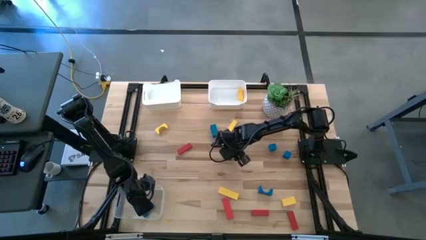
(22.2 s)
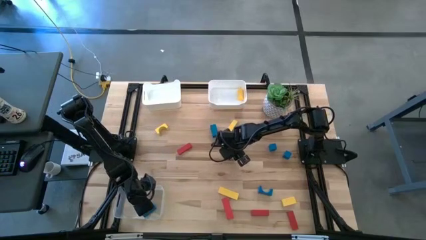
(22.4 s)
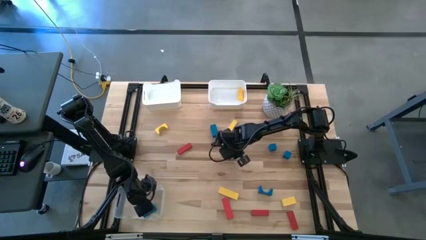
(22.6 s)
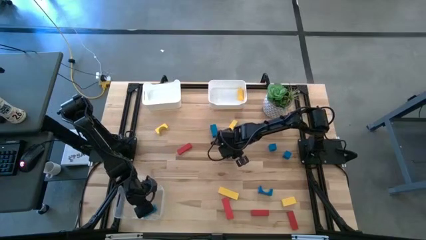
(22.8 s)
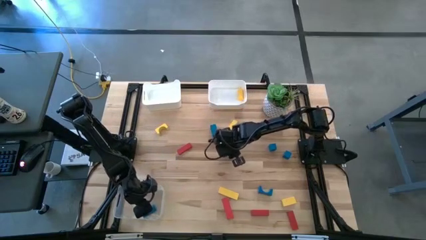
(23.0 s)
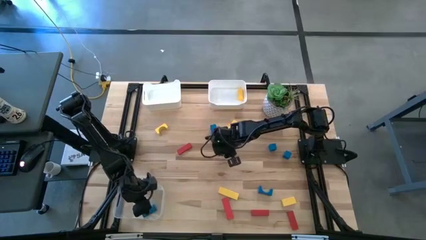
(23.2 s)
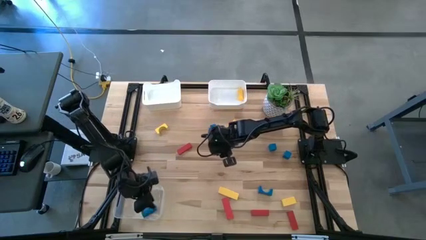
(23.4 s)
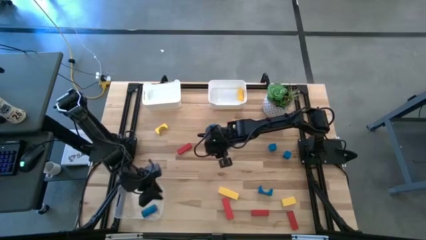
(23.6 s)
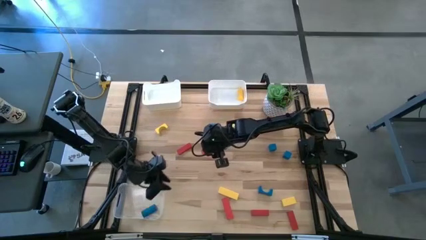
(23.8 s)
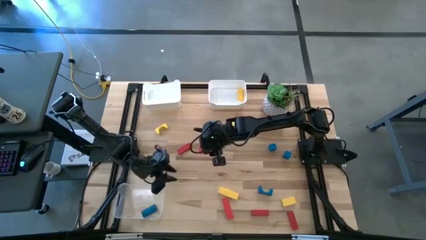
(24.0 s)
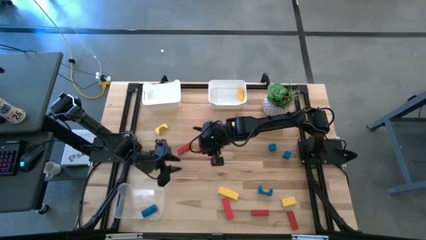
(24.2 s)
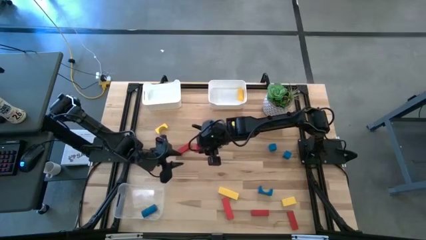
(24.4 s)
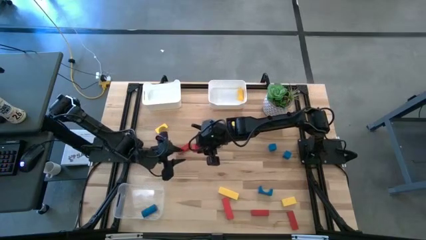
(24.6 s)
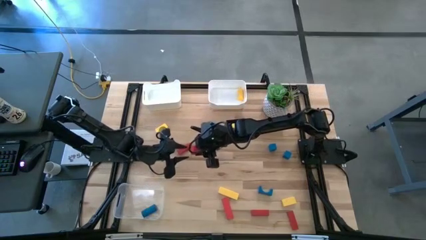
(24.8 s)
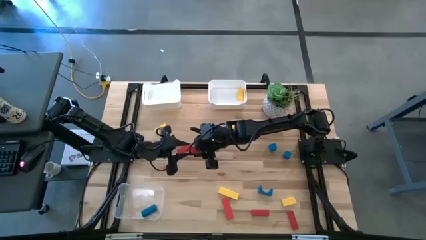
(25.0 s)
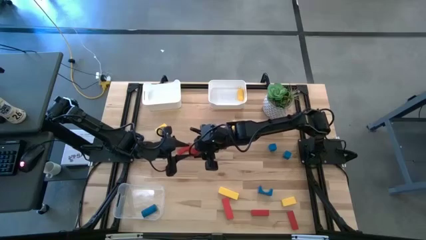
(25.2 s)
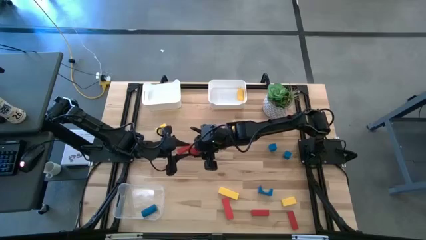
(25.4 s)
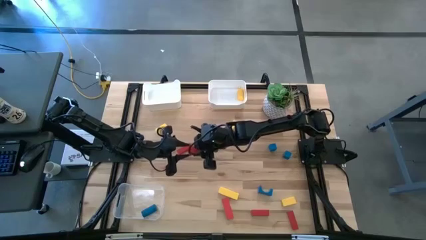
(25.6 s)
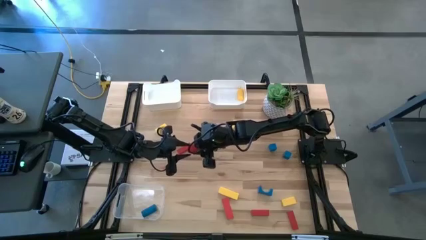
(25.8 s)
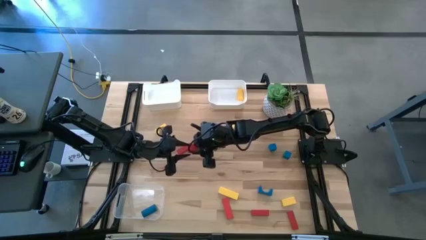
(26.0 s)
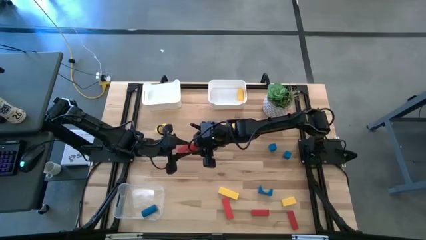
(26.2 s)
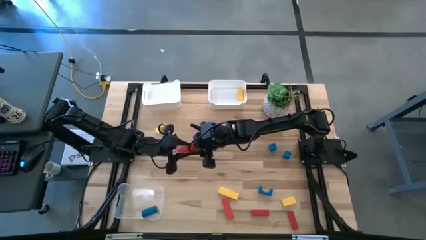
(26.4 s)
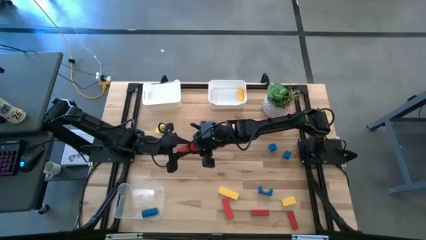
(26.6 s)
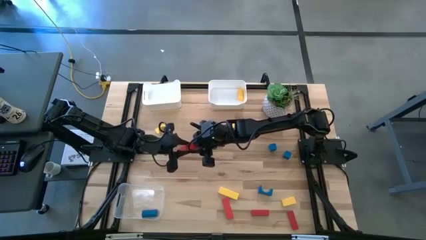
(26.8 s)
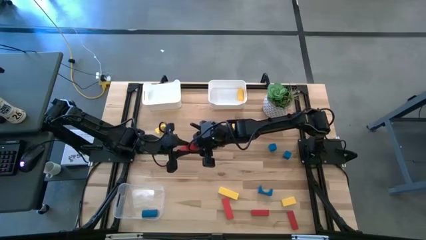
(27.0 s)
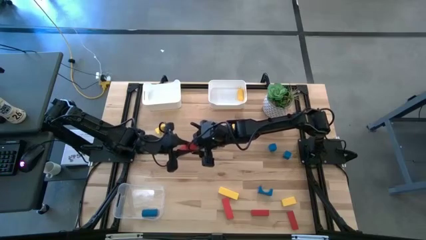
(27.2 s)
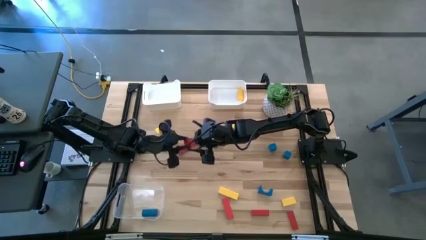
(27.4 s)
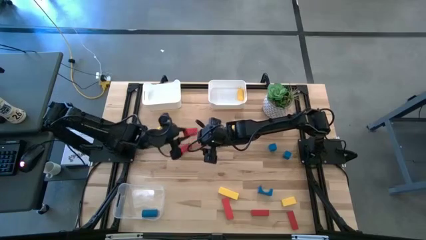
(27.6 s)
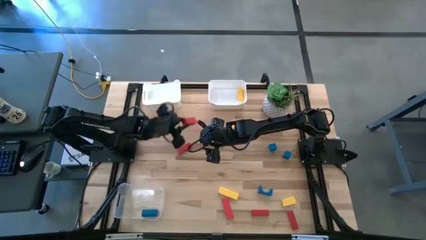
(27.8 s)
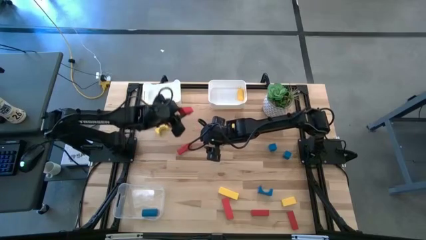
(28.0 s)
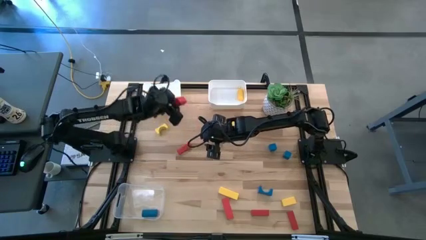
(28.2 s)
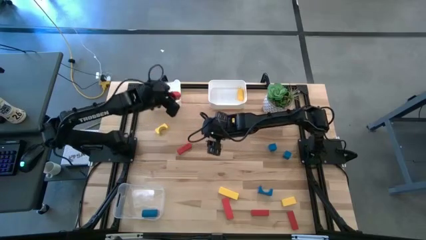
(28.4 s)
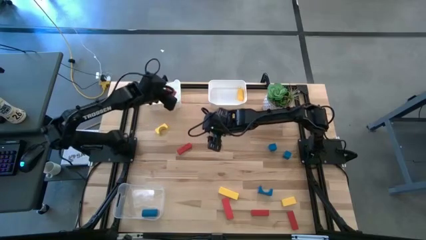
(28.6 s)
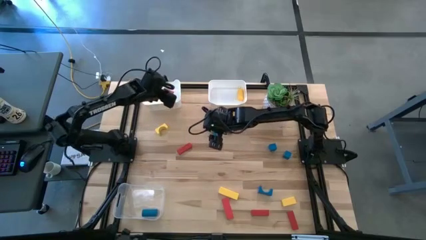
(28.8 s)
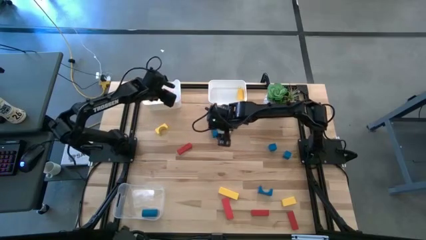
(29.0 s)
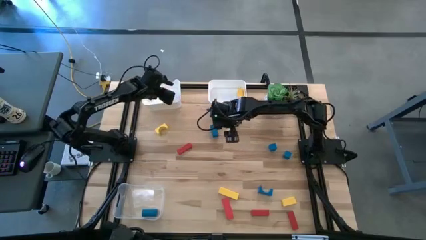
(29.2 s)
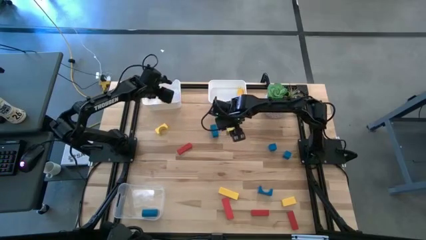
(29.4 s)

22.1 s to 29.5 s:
Task: Sort & place blocks by color
Put the red block into the left white bin

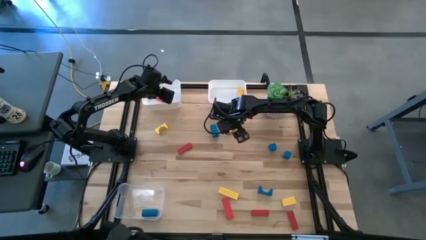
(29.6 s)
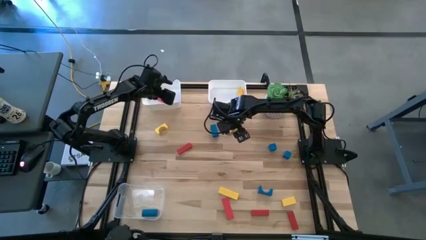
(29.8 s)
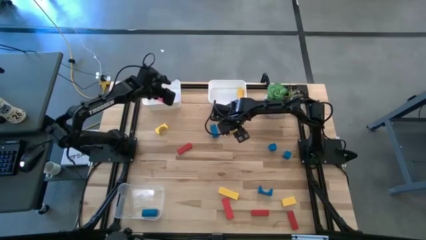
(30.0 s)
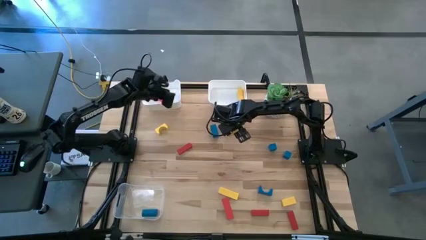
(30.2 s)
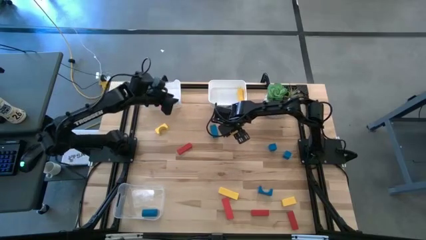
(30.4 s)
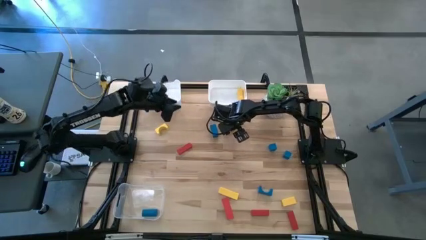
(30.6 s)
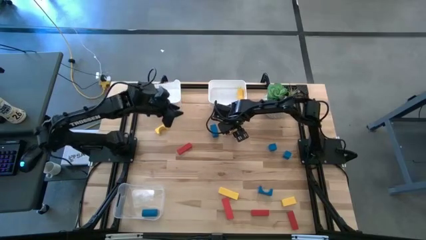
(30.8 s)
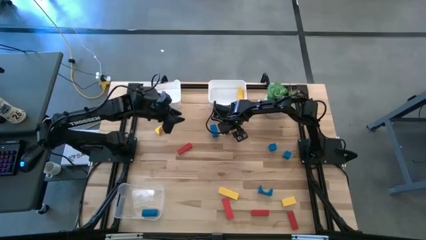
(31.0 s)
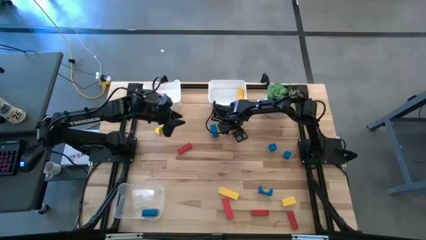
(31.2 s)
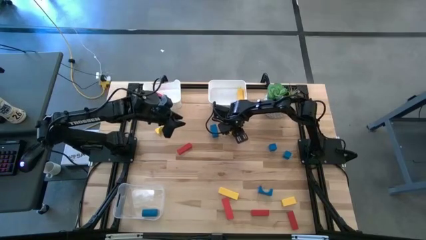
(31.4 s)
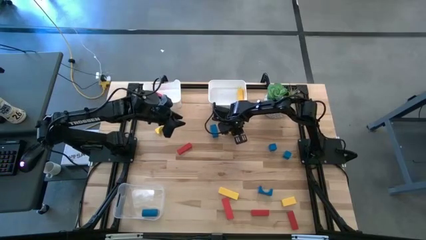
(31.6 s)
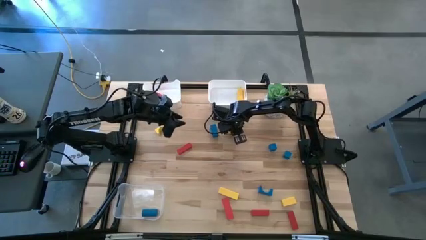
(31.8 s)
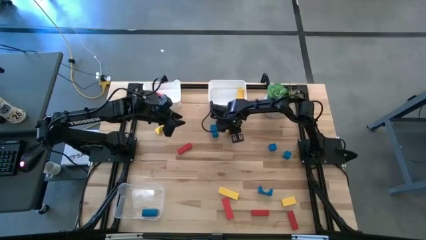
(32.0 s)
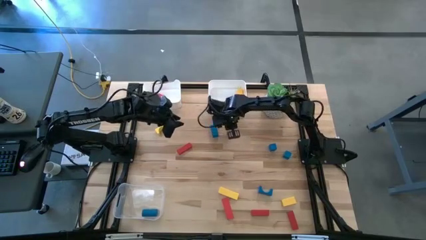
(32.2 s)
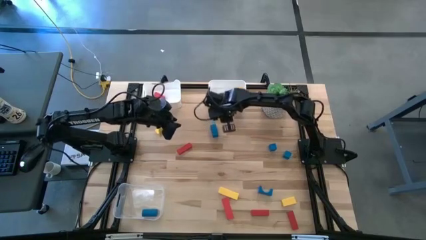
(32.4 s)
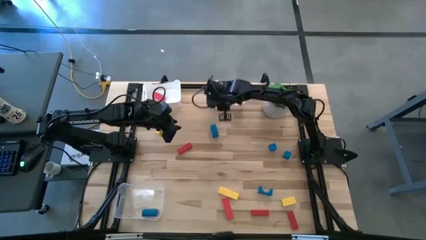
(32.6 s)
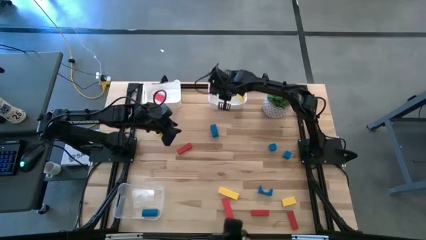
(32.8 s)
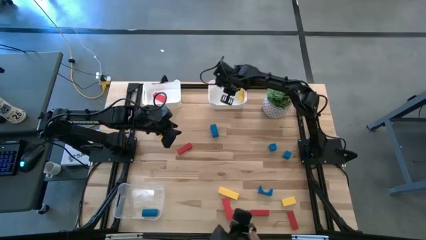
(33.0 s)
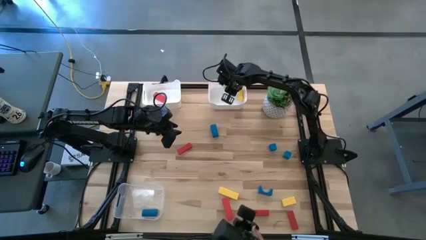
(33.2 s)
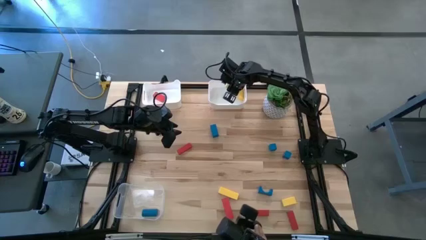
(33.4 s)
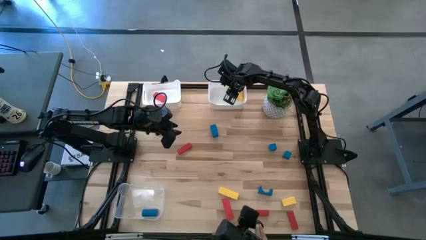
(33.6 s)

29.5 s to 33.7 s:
Put the yellow block into the right white bin

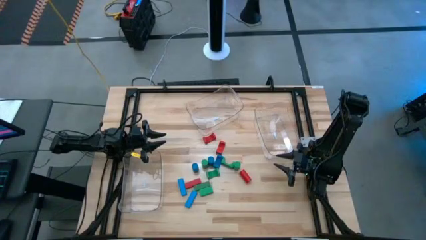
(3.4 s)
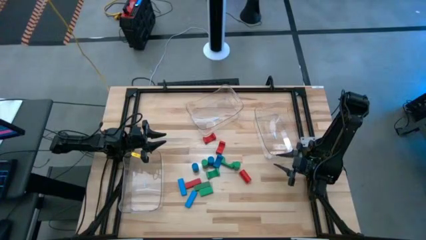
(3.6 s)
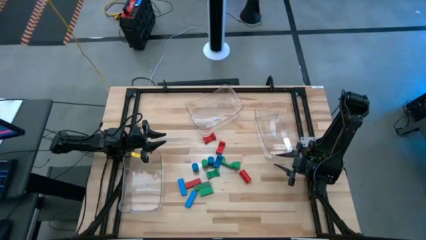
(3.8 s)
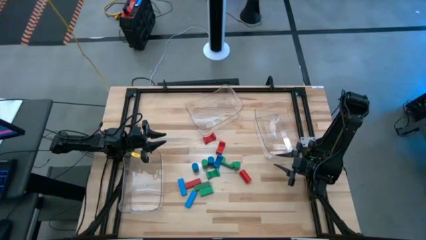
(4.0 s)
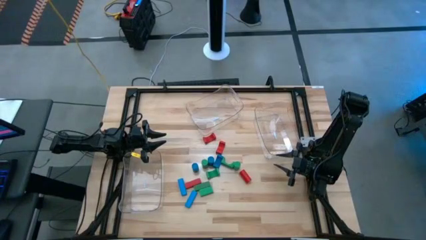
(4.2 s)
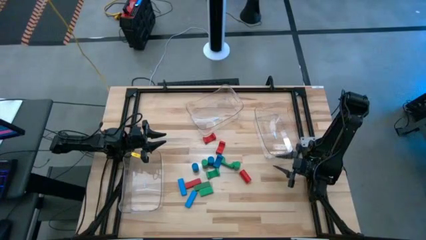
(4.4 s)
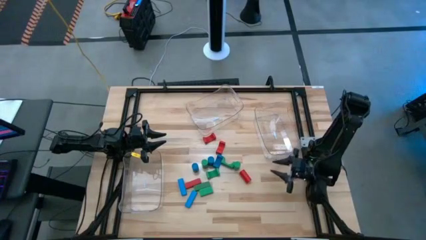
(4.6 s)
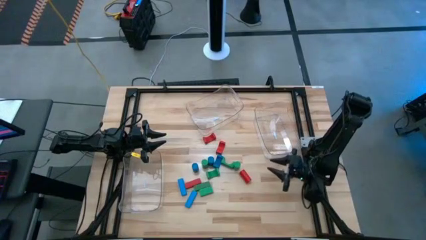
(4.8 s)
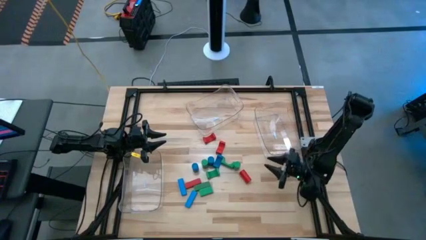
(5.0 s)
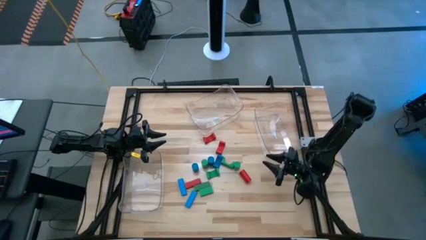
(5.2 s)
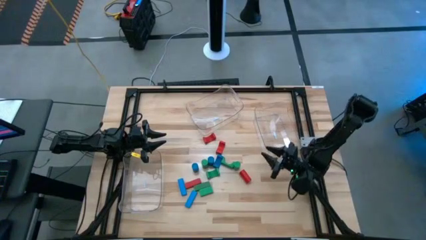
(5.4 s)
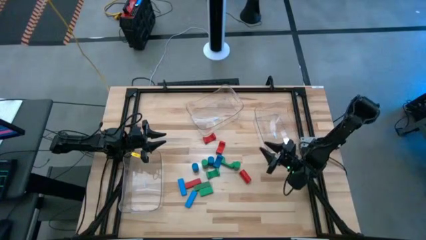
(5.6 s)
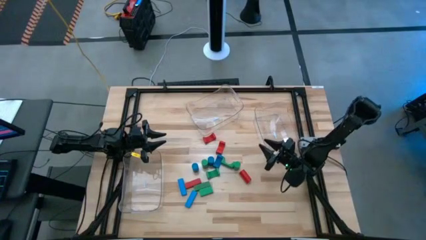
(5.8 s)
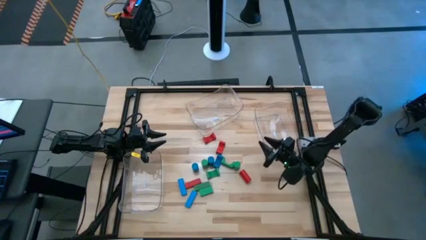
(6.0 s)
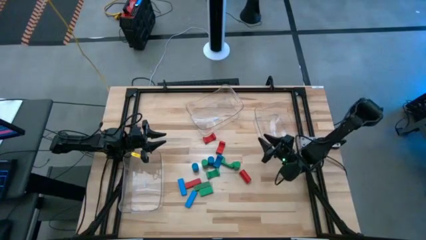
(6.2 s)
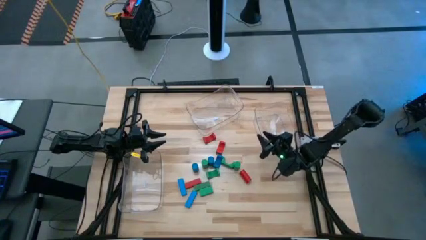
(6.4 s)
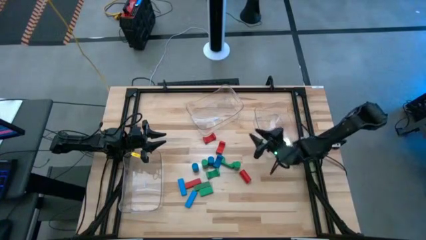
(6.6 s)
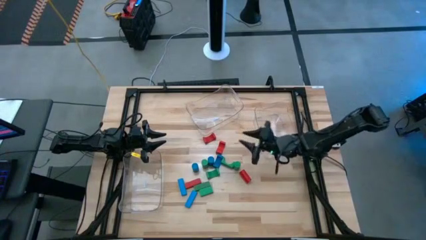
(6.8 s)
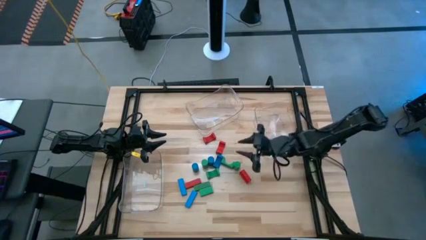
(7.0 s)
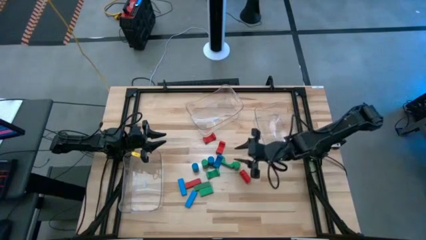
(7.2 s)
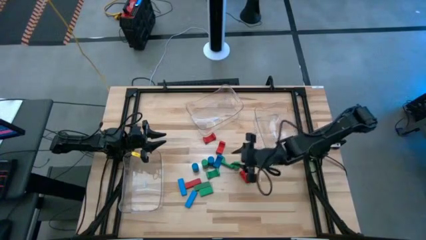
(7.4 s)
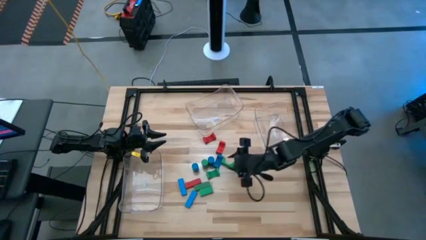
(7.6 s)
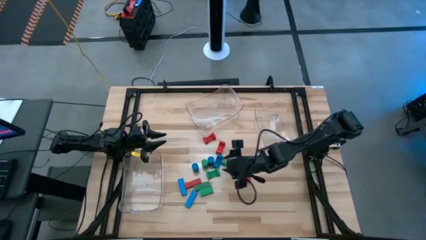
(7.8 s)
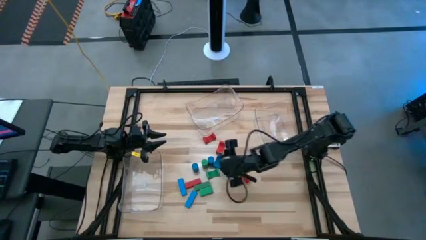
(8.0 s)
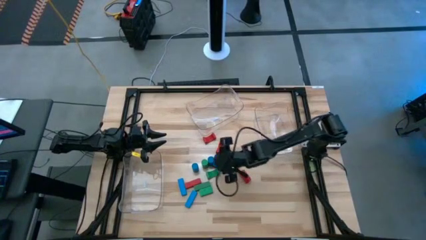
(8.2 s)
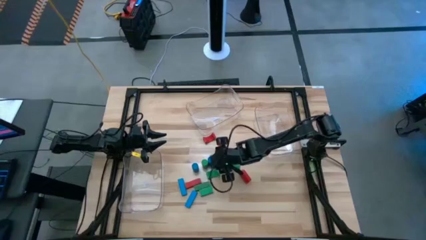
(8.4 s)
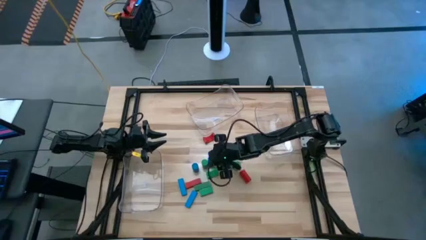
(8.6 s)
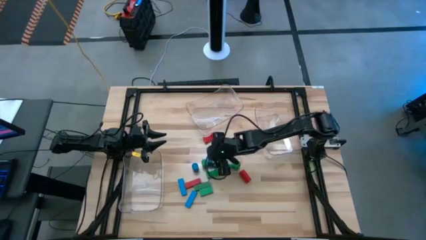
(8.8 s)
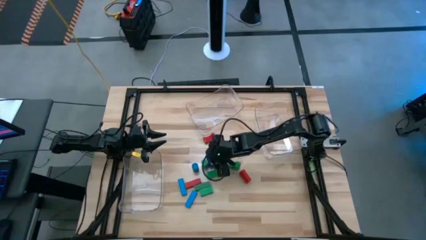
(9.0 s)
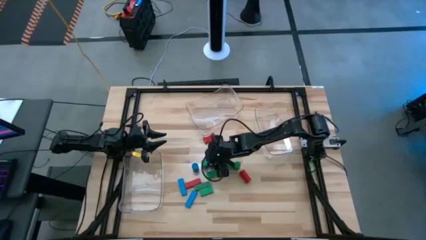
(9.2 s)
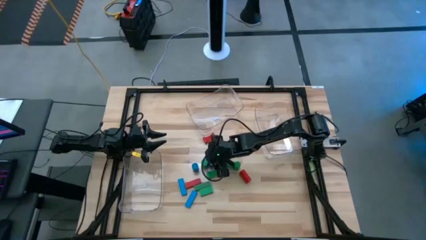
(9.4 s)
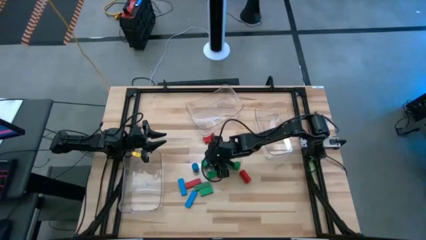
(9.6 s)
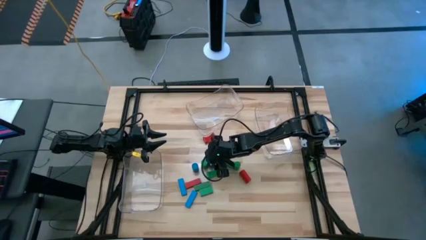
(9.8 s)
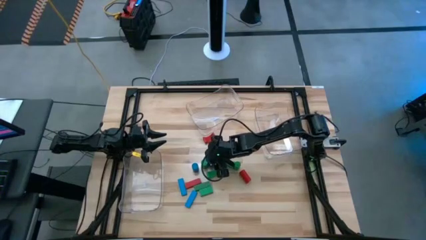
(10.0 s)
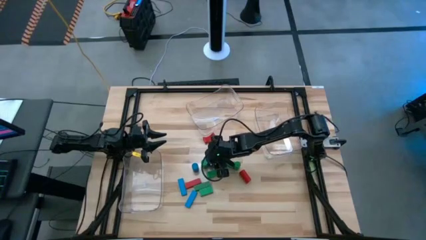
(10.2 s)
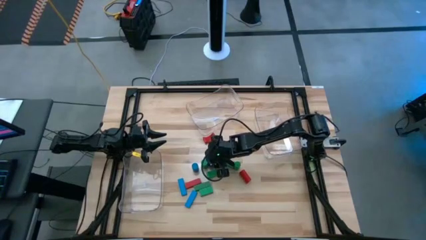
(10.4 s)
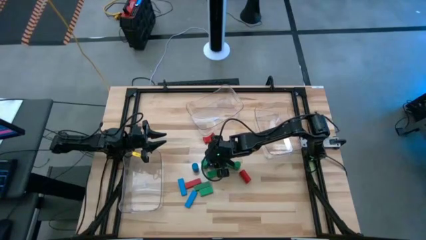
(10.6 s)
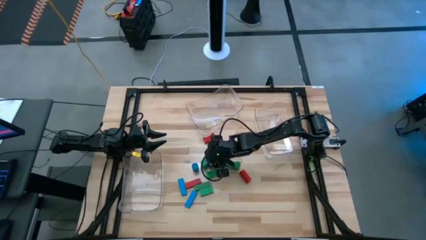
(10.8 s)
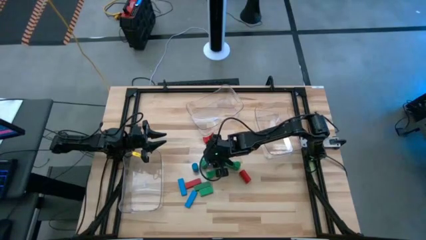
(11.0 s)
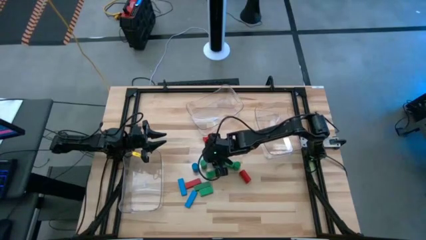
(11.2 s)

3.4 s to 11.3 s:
Task: Sort blocks by size
Put the right blue cylinder block into the top transparent bin
